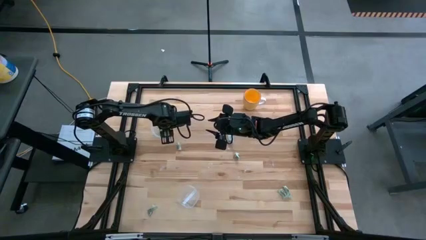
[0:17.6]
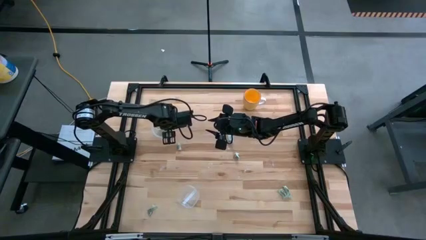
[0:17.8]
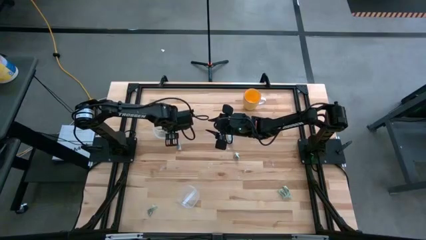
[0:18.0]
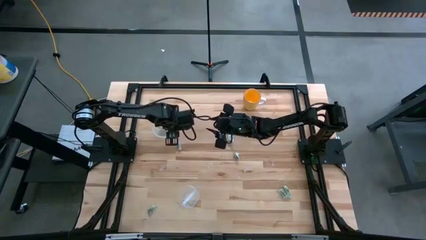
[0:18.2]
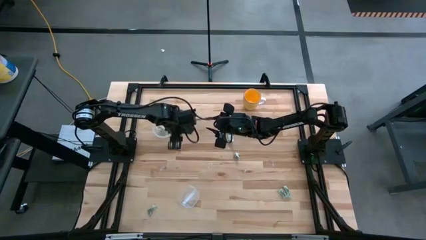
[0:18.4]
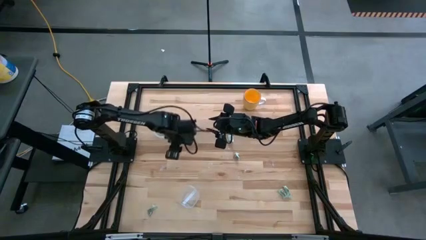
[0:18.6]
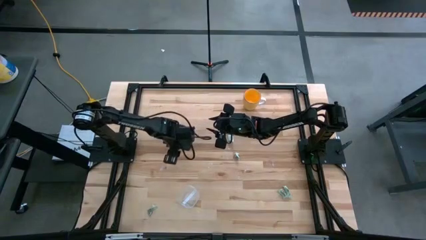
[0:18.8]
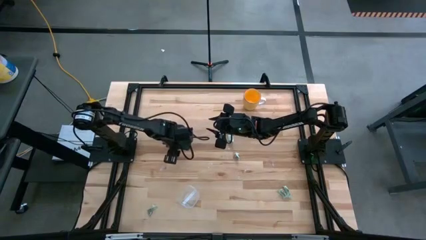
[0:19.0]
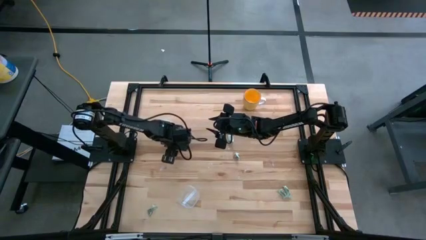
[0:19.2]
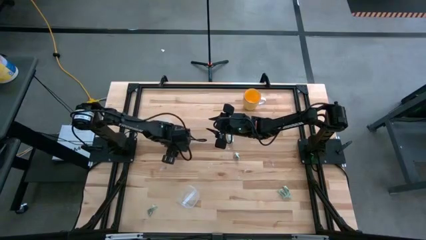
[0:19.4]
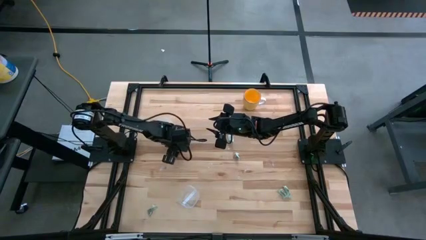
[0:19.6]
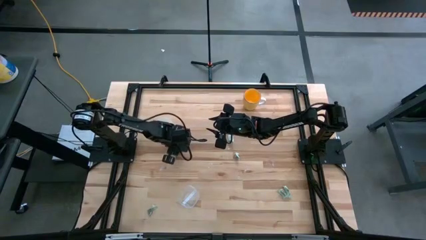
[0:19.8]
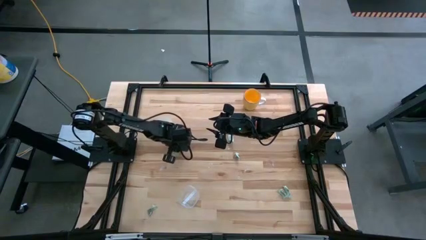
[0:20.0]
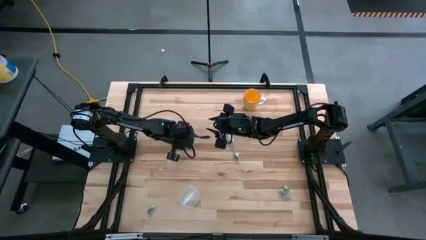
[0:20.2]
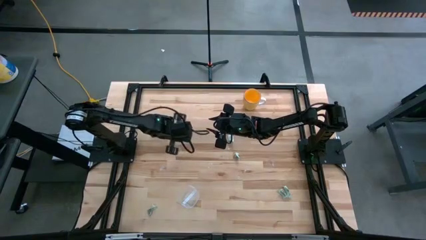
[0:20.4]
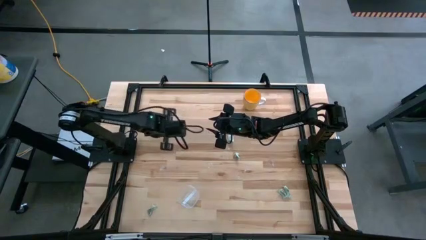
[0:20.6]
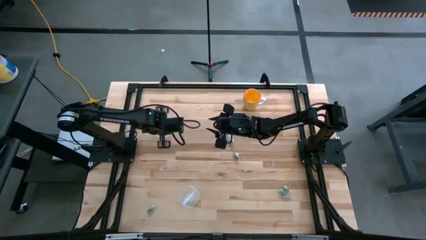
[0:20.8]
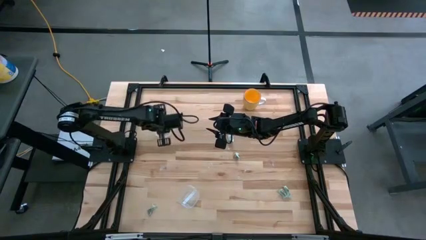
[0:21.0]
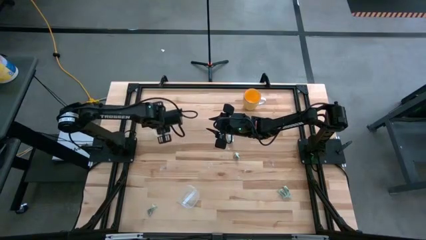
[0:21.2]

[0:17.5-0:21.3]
Task: Pick and place items into bin
Put the stevia packet into the top transparent bin

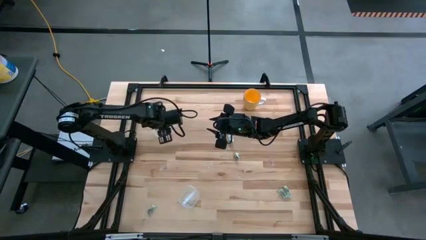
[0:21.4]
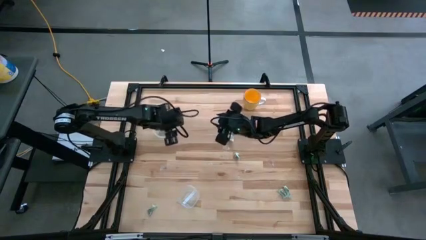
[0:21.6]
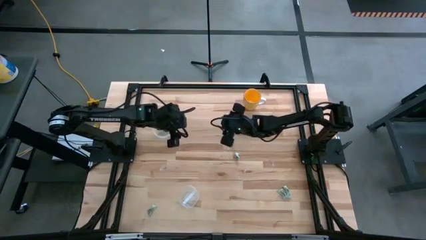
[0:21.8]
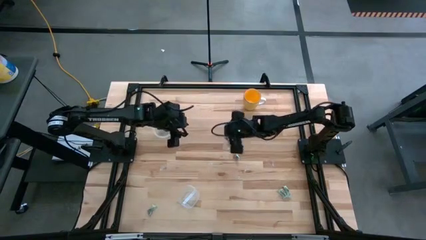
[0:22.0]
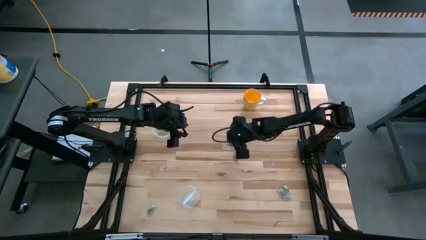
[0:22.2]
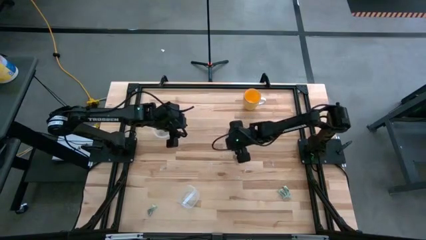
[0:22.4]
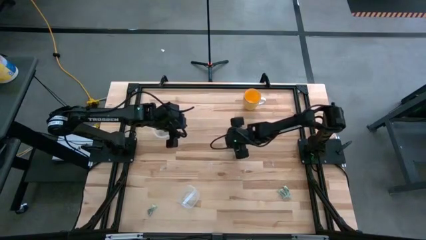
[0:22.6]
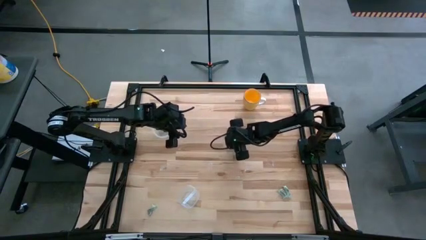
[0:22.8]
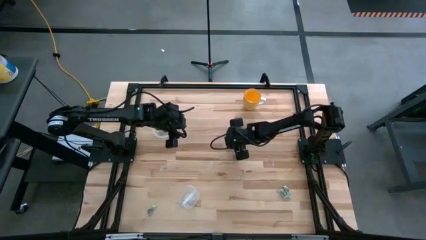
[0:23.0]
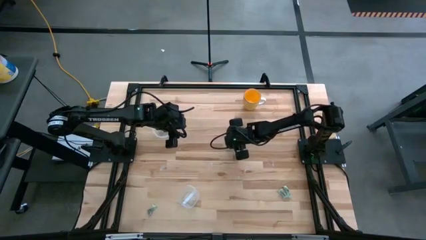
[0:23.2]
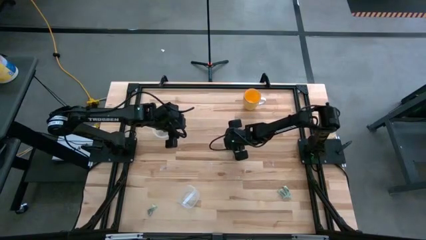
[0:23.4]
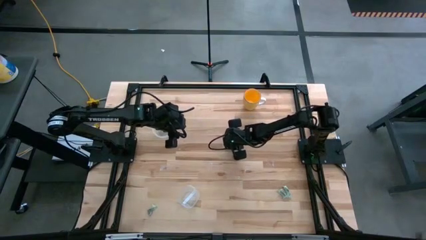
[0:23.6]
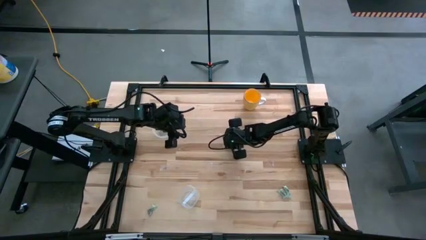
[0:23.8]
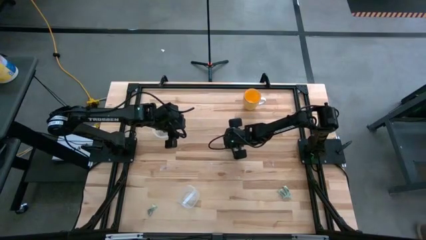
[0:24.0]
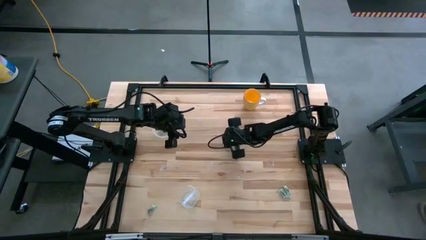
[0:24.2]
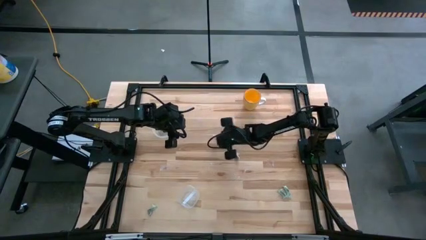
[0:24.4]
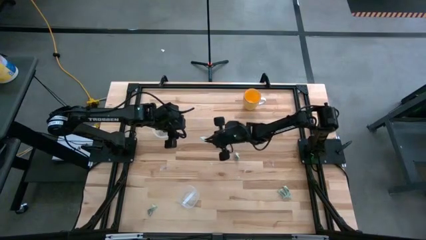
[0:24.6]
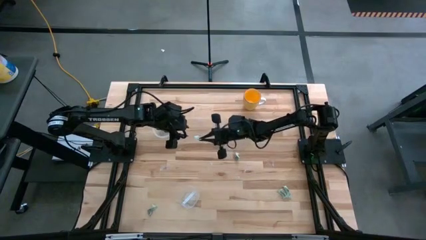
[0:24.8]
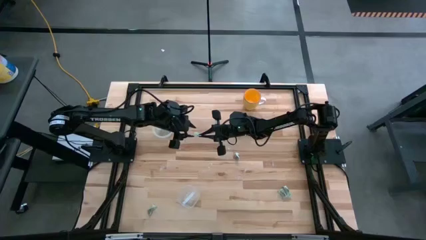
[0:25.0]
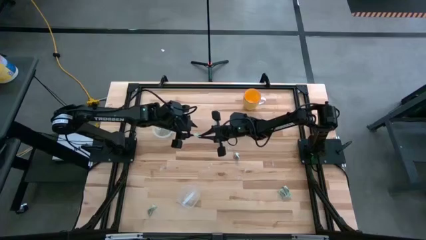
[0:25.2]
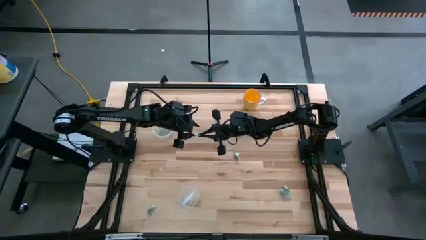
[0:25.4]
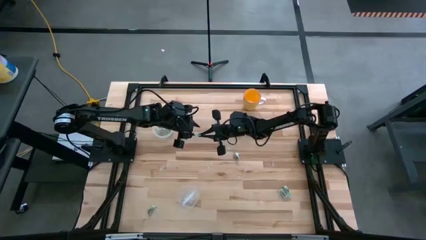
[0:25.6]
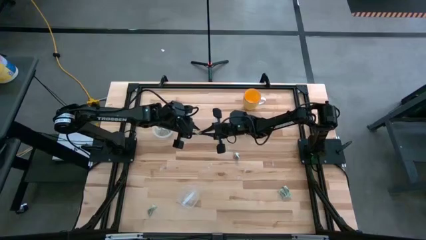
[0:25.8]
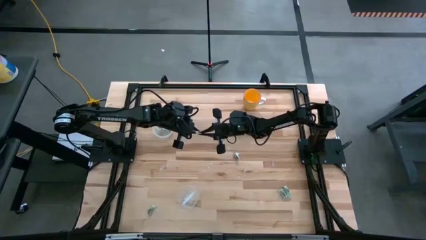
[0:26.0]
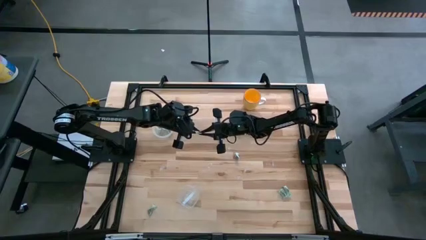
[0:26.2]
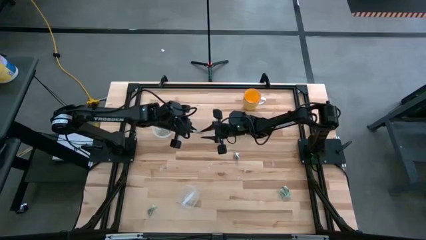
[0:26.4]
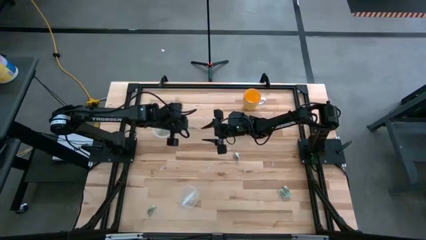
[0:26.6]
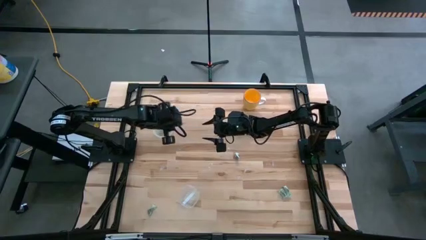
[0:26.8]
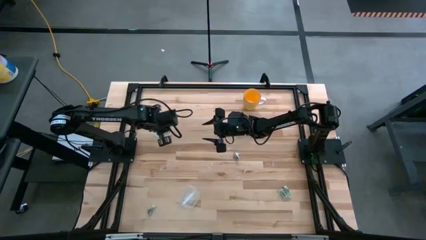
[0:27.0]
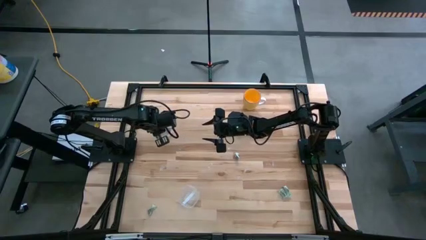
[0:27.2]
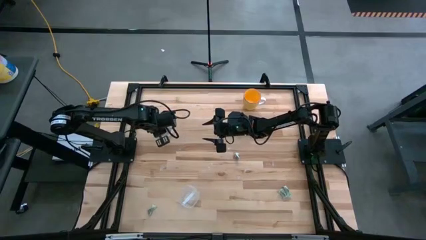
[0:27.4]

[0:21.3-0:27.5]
Put the stevia packet into the top transparent bin

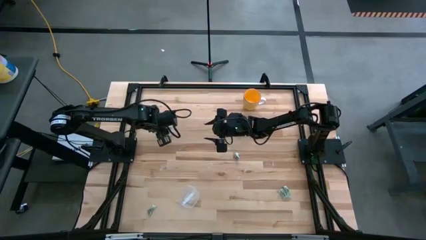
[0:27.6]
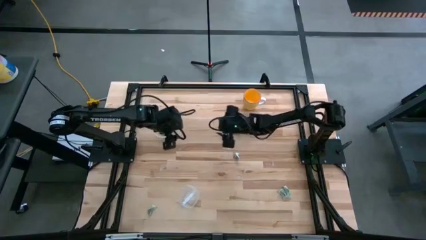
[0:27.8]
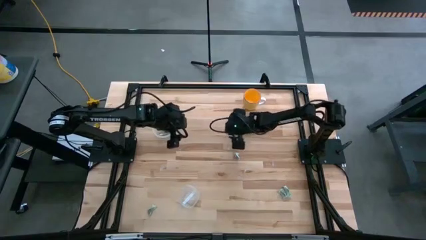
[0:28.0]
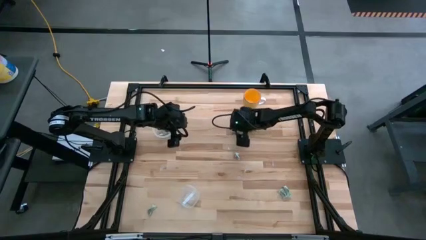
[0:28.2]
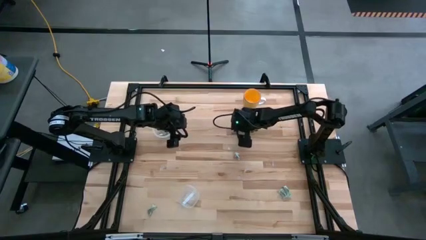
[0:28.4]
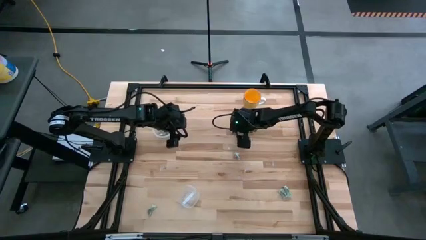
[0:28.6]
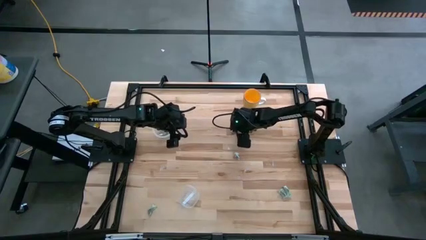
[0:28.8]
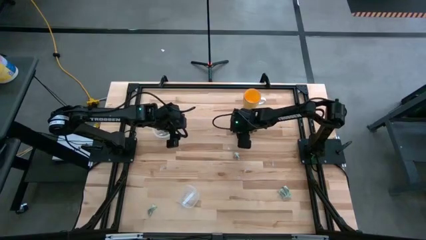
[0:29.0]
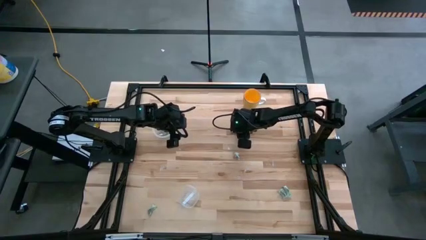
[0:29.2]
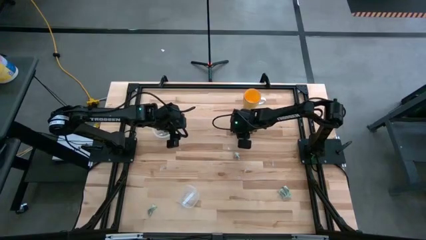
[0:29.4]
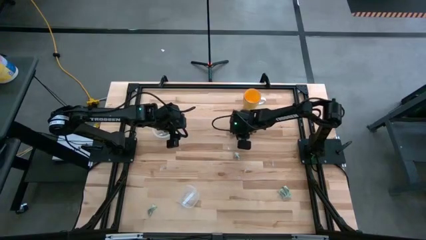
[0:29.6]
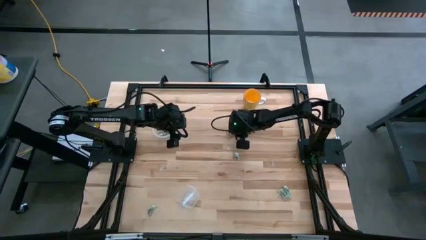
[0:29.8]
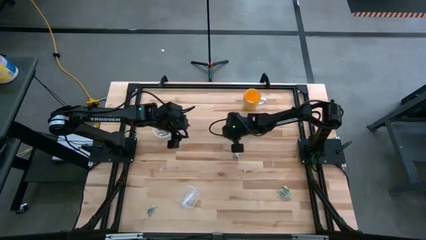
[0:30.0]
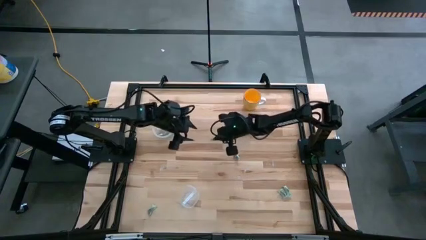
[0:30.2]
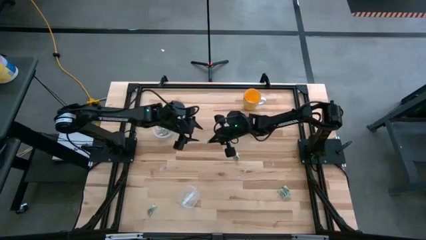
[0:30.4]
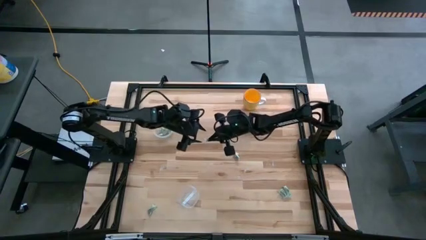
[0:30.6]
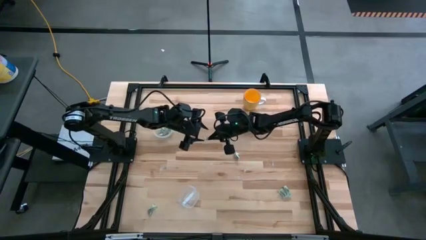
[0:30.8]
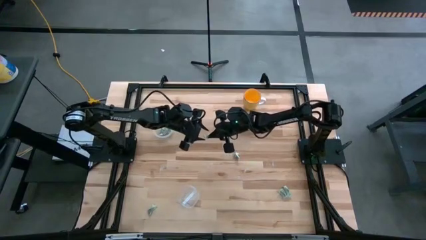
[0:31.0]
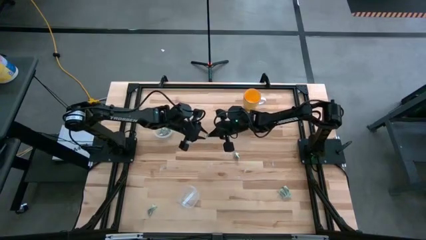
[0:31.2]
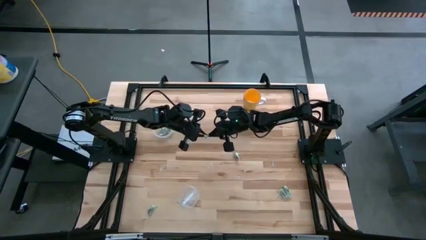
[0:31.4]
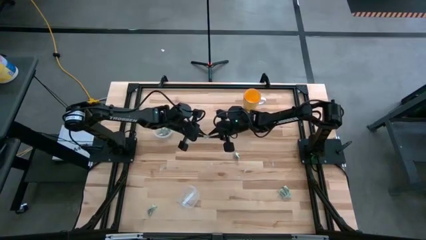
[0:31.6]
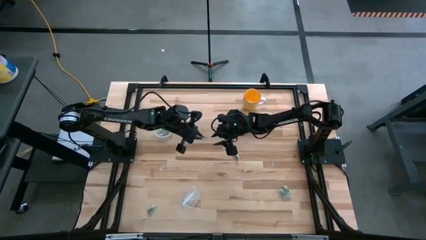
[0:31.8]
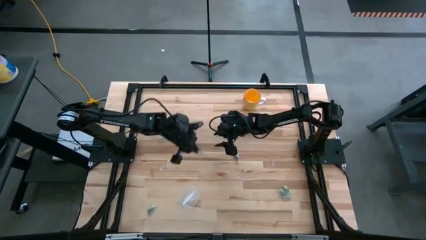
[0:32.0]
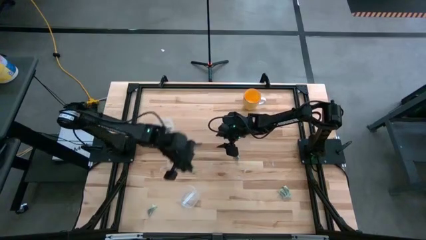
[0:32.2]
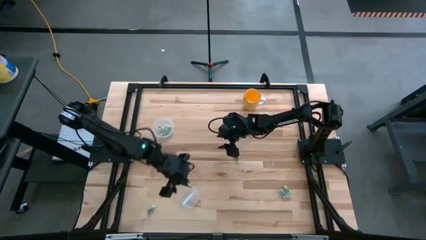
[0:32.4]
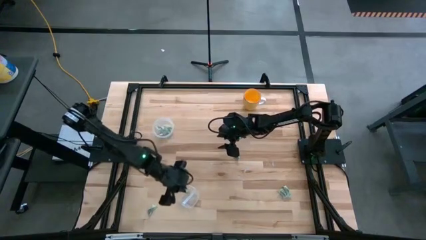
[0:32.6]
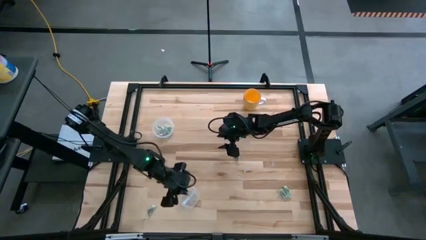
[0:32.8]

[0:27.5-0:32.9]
Put the stevia packet into the bottom transparent bin

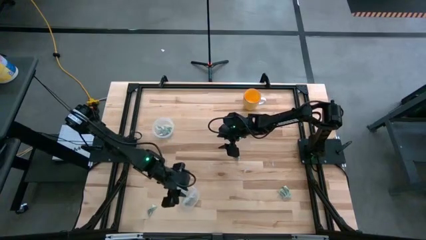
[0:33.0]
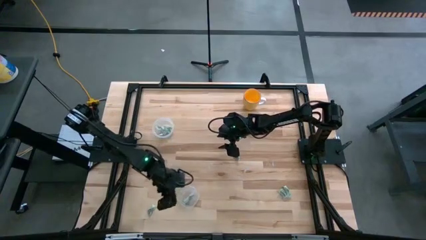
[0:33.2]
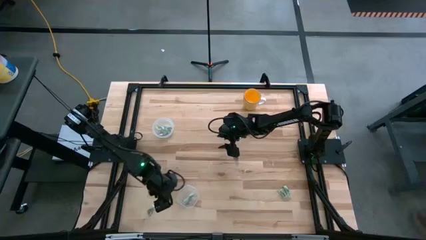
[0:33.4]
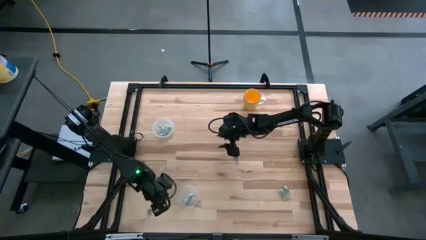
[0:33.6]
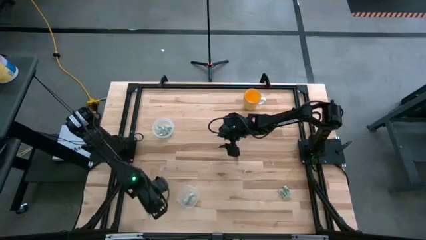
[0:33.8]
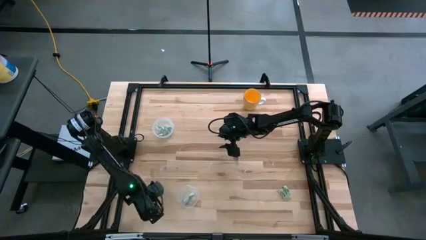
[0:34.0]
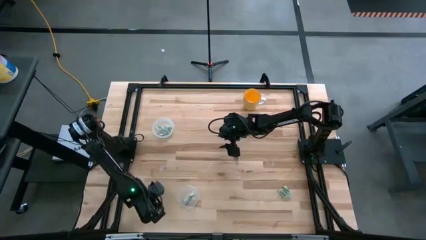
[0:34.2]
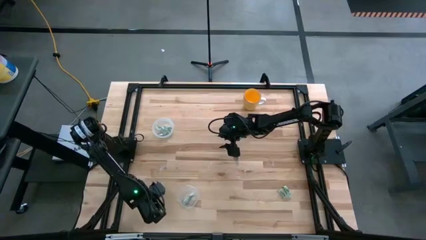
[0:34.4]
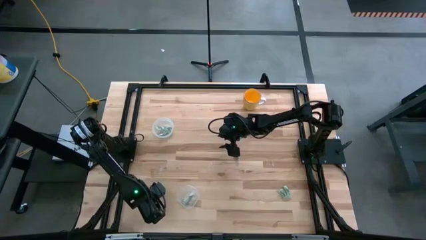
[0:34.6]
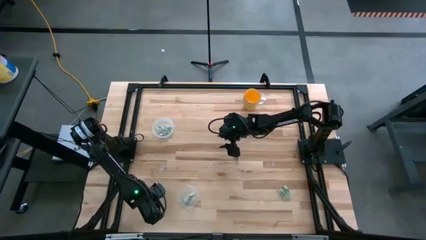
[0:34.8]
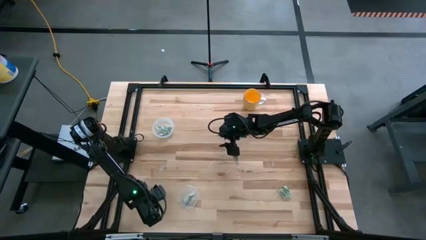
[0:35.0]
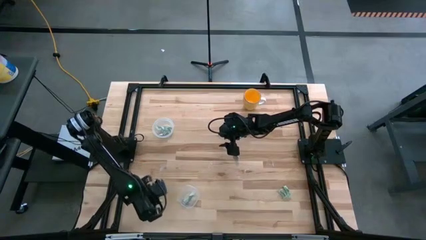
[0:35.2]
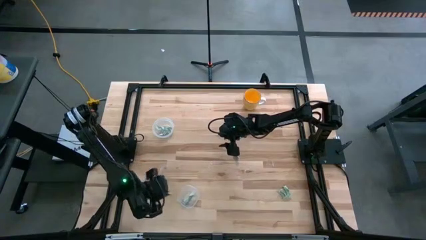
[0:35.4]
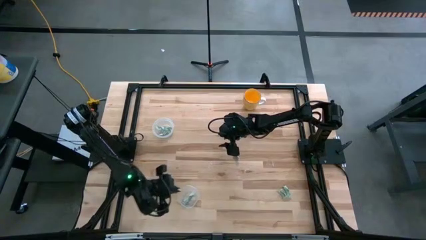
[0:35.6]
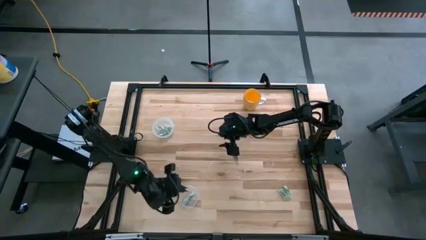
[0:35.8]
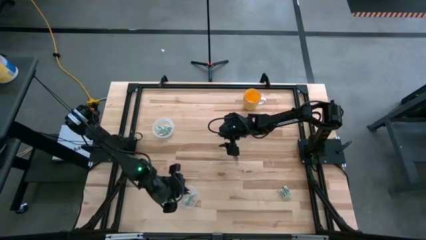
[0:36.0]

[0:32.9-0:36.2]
Put the stevia packet into the bottom transparent bin
